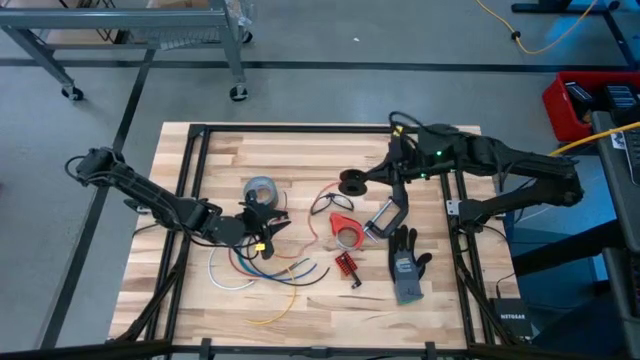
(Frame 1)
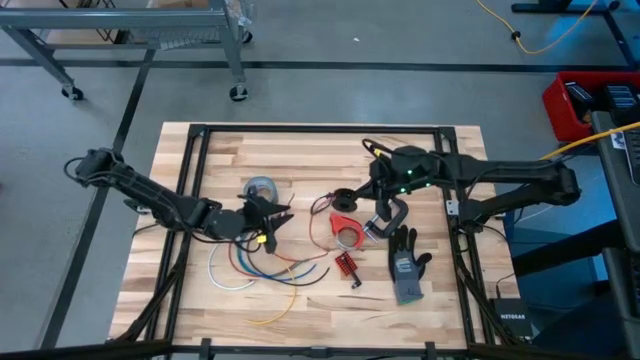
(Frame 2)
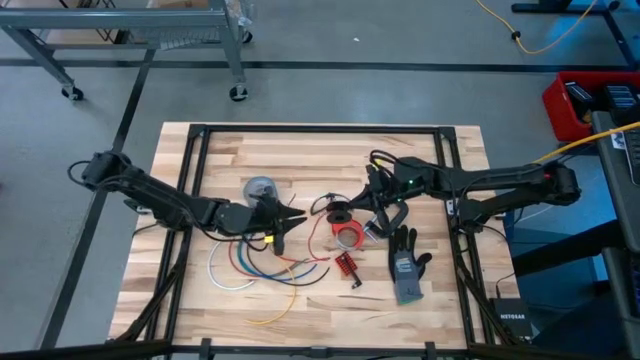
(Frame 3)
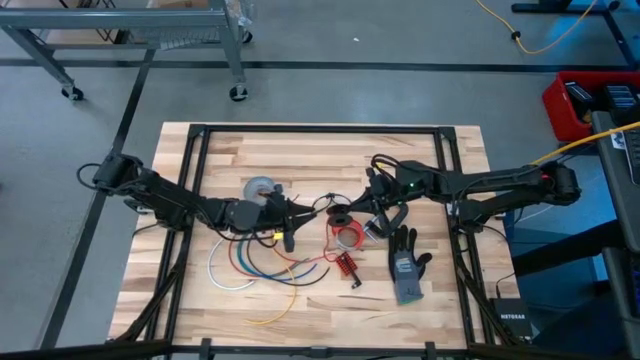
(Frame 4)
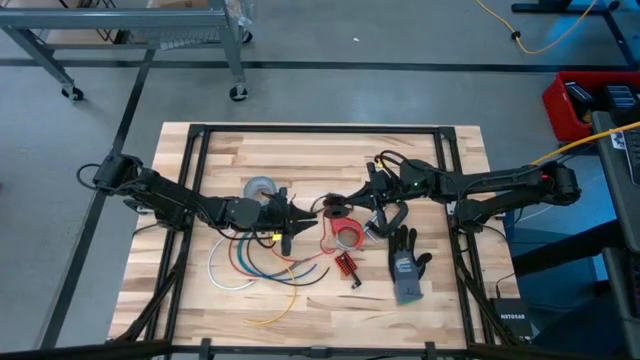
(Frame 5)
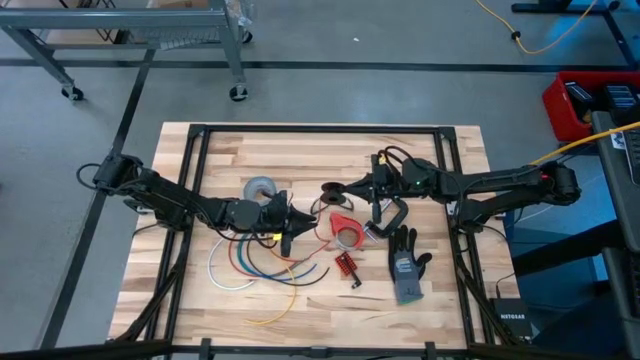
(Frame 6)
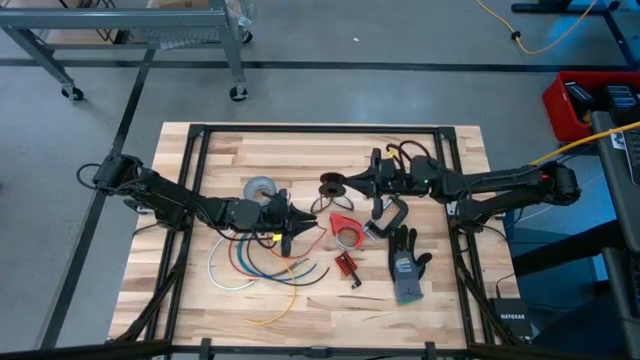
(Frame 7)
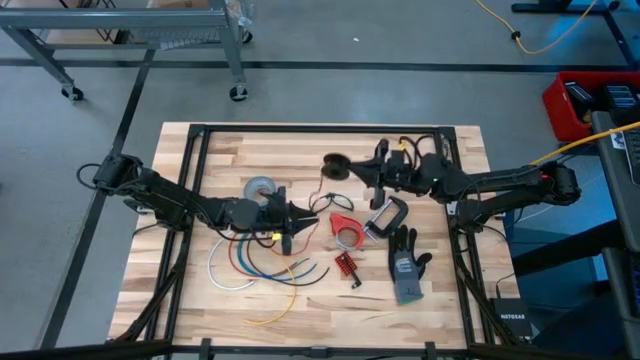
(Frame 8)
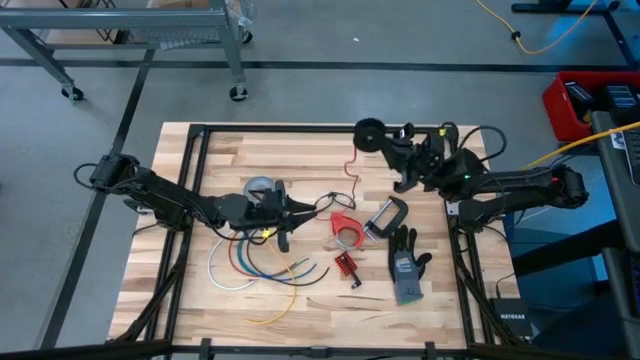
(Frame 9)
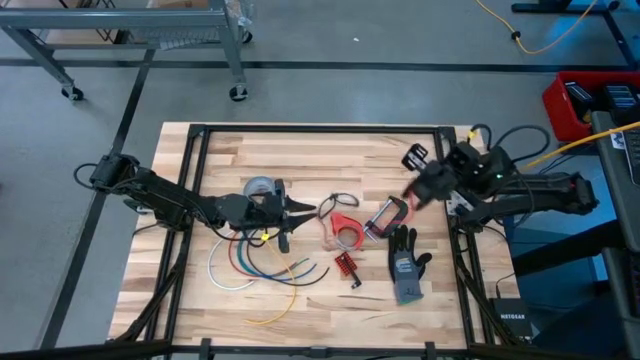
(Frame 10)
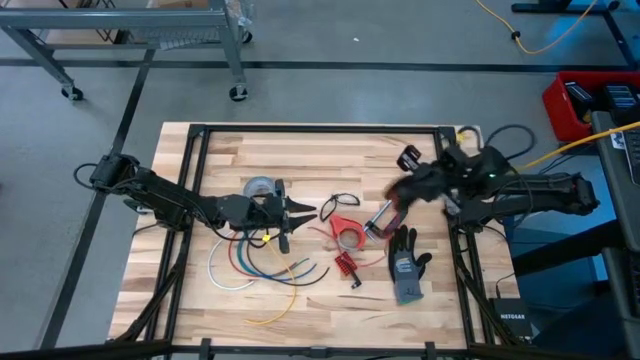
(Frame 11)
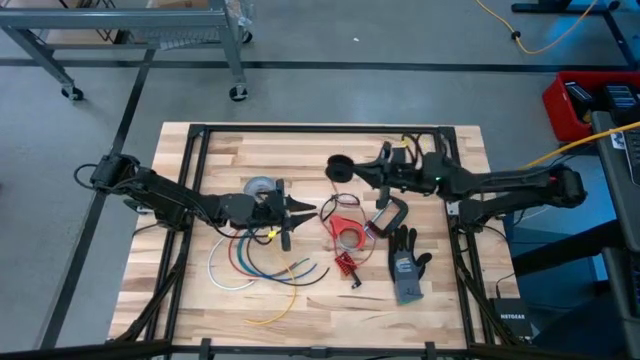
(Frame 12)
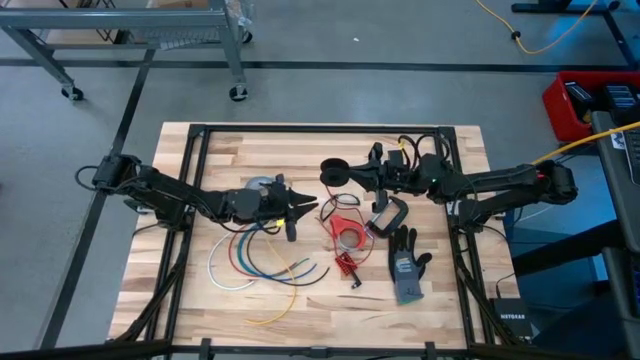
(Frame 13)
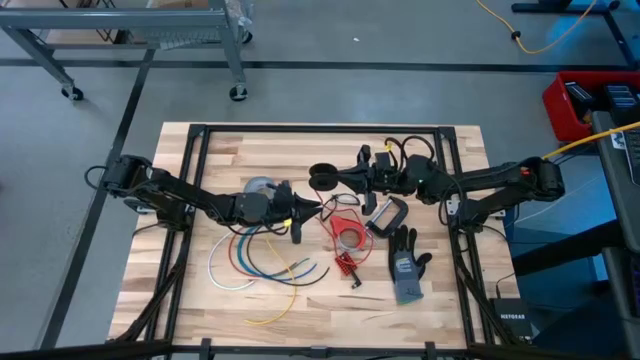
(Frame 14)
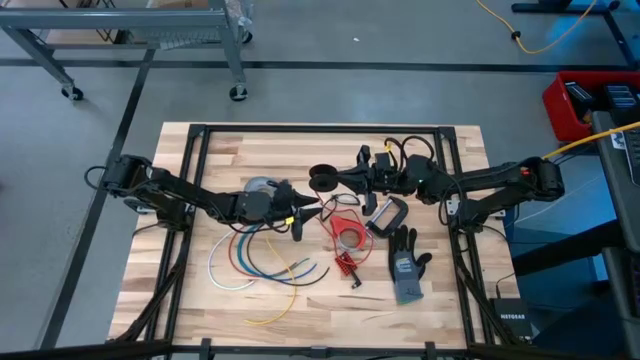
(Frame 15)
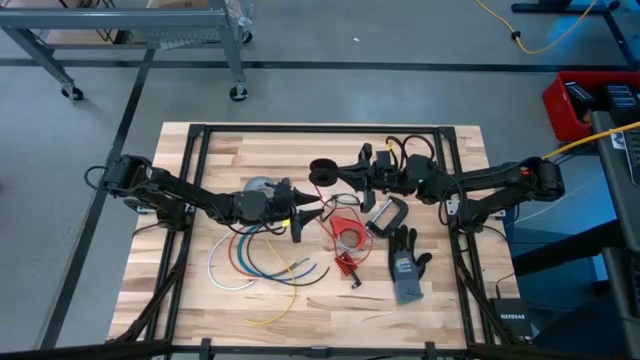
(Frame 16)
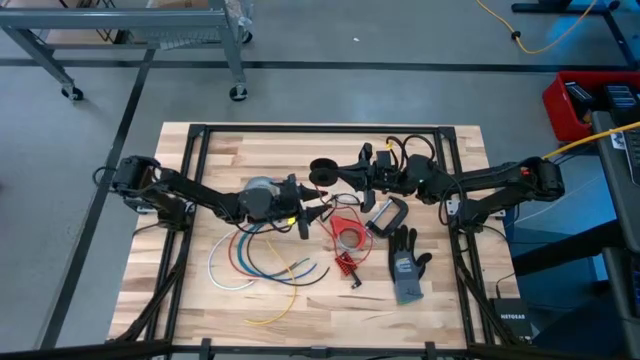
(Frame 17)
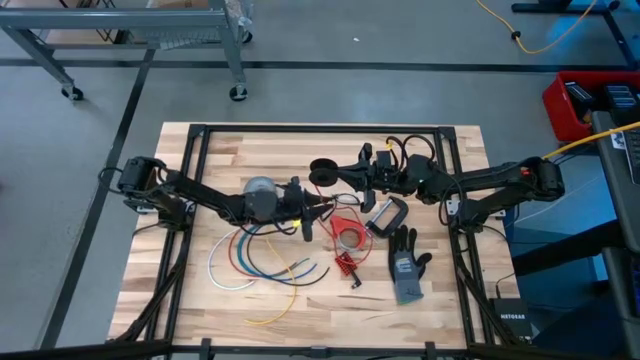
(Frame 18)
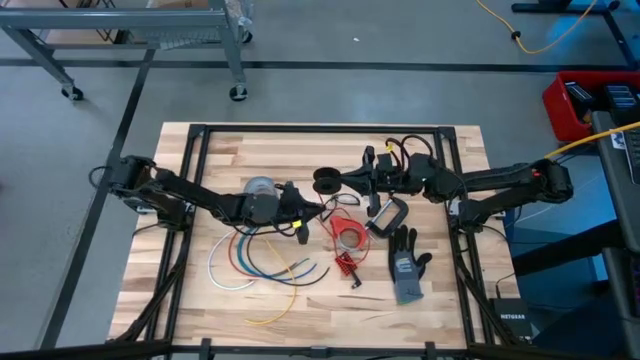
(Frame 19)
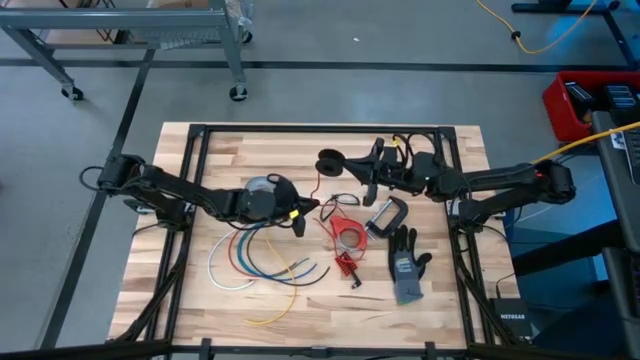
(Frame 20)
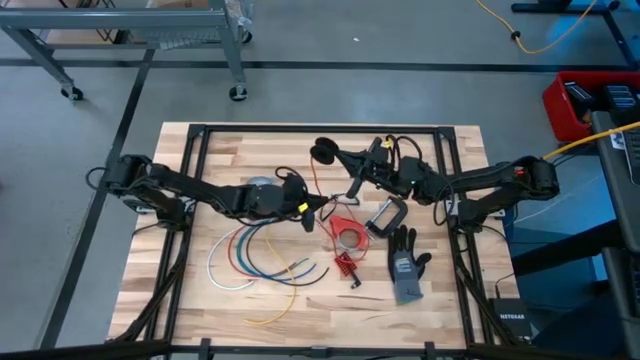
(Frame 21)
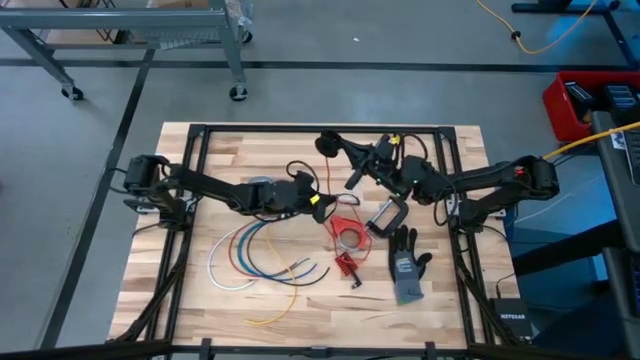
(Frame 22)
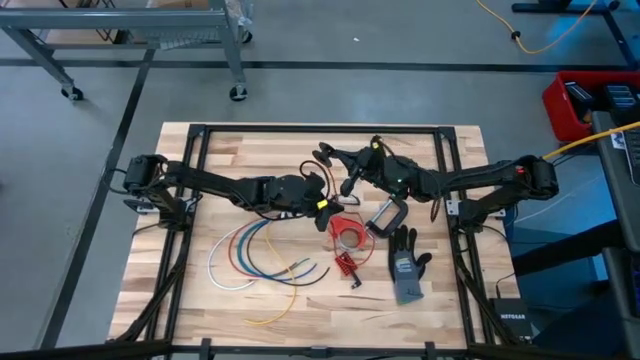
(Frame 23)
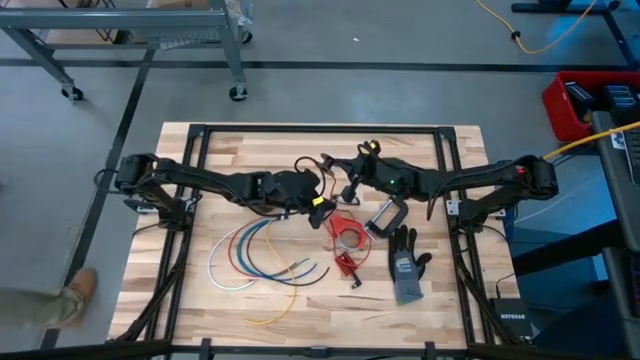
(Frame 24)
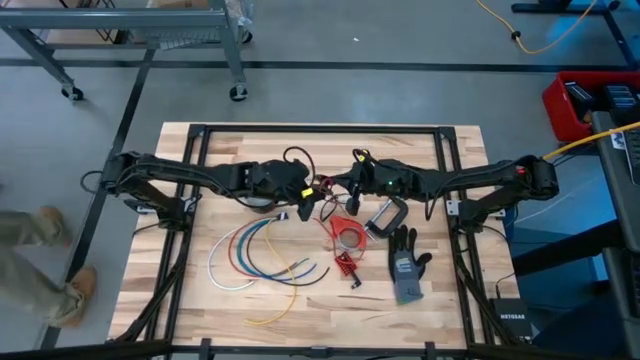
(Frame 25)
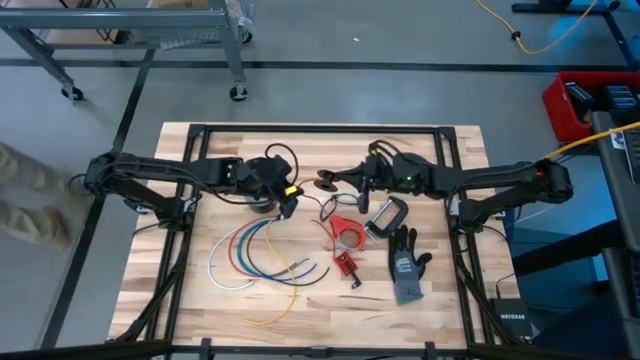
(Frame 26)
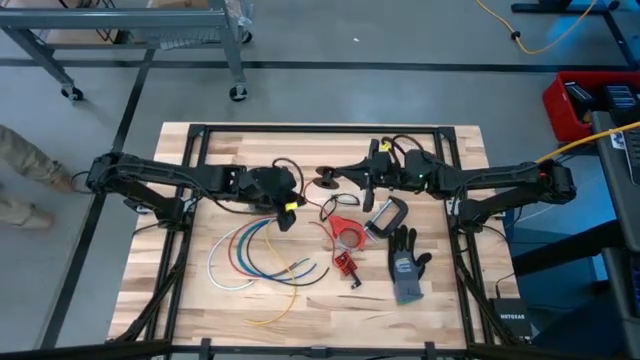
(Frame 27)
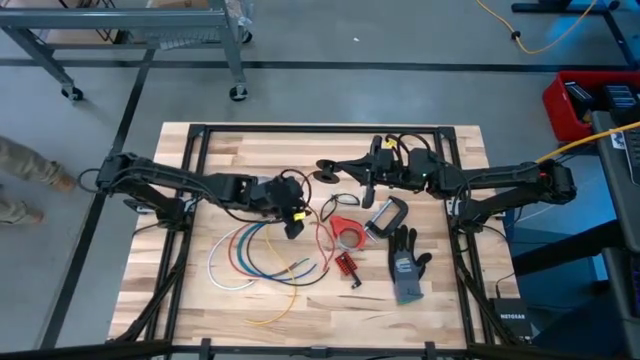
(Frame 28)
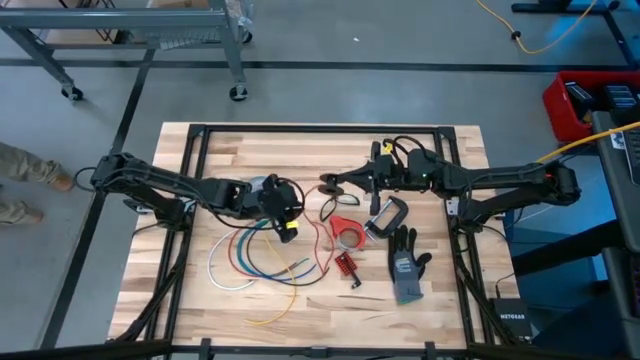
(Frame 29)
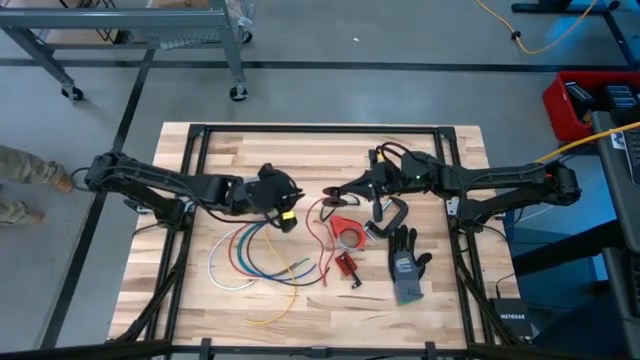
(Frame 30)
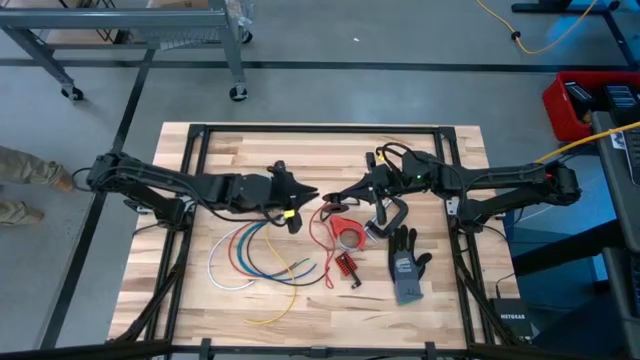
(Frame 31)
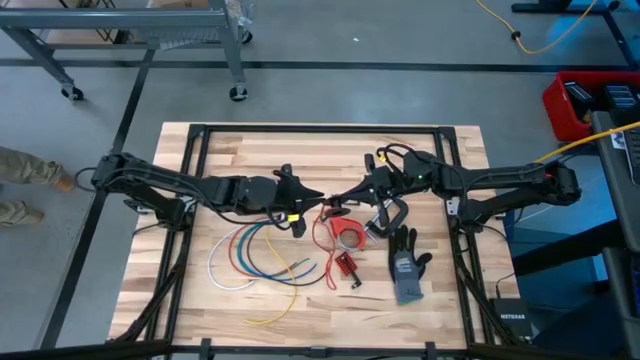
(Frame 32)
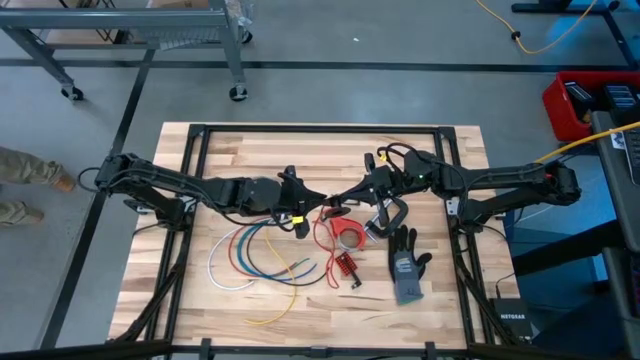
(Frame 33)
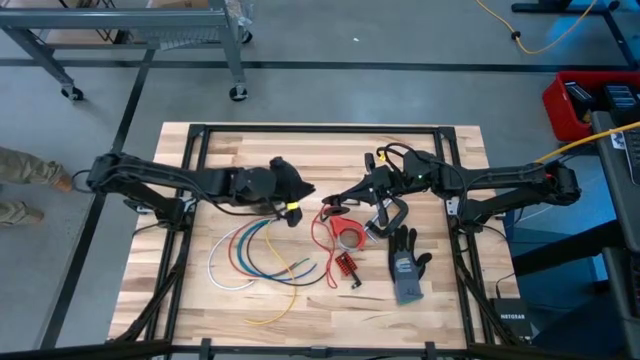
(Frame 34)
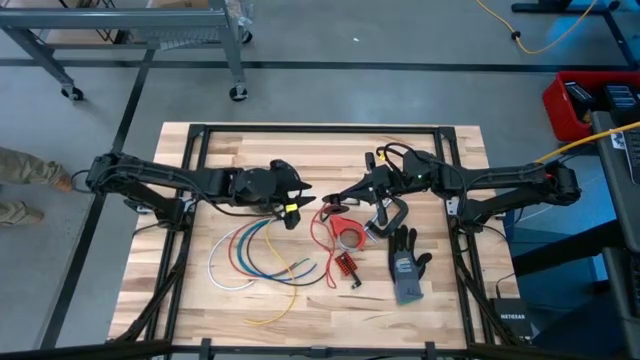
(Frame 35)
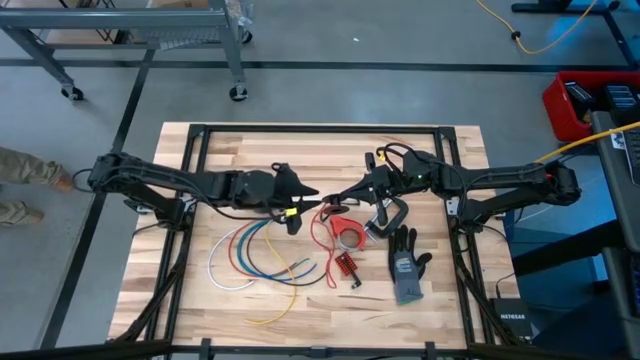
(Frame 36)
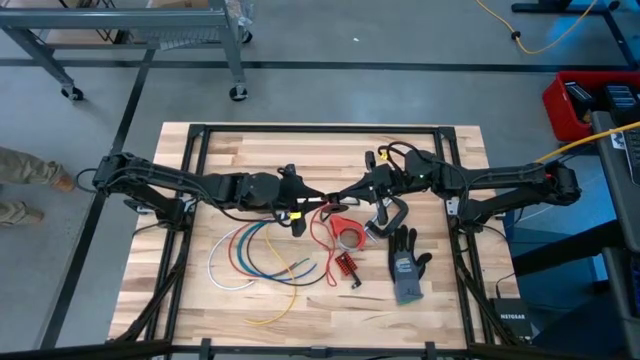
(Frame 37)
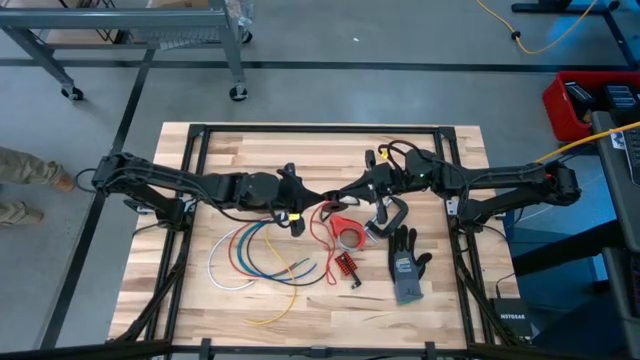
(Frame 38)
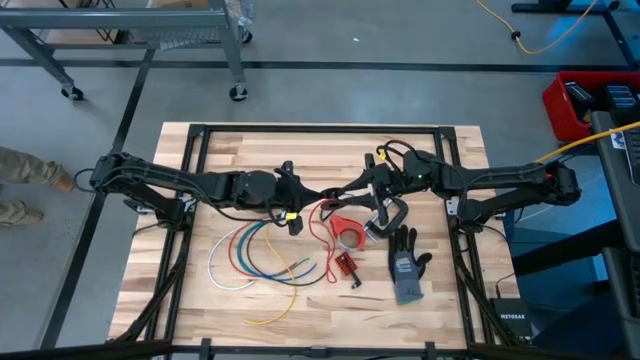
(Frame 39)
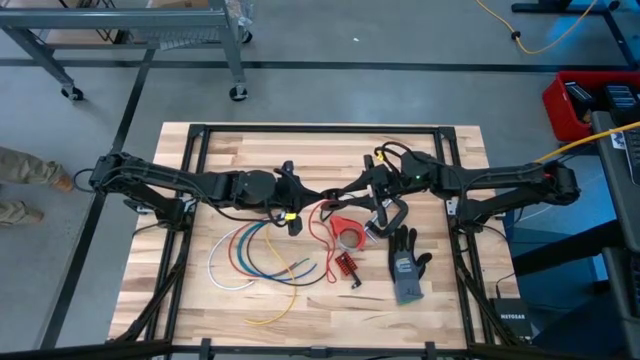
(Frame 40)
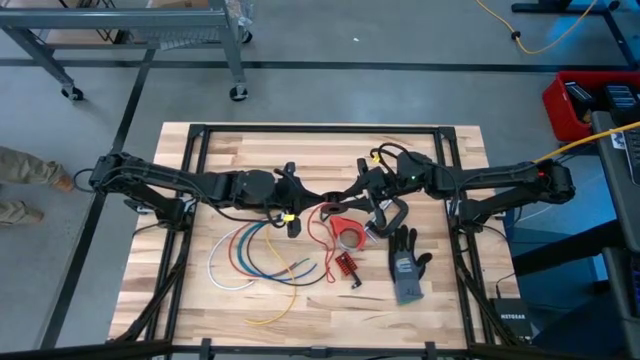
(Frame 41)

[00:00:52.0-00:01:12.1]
Task: Coil cords
Coil the red wire onto the spool
